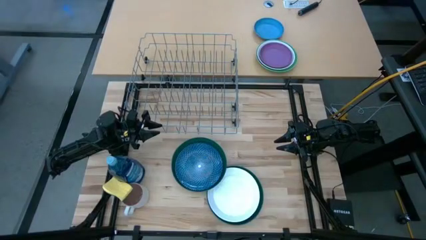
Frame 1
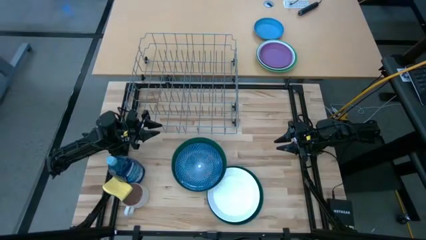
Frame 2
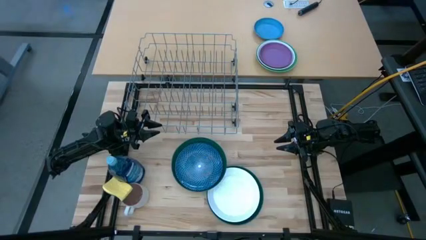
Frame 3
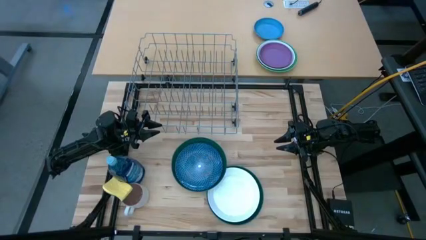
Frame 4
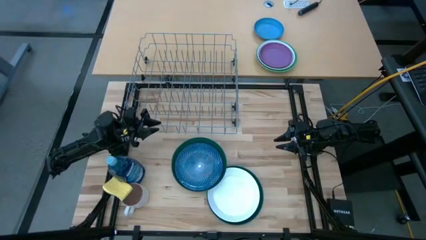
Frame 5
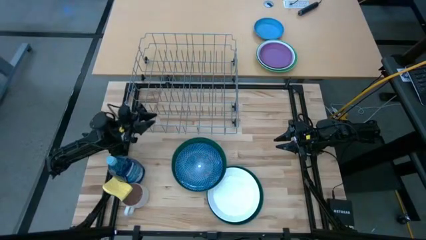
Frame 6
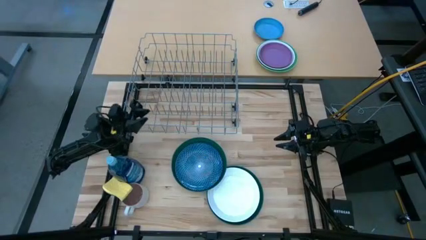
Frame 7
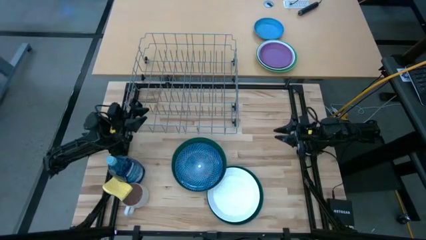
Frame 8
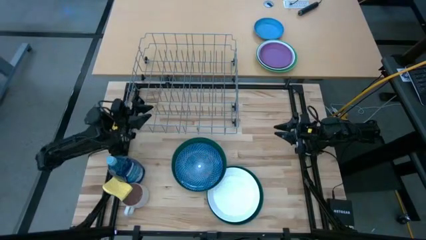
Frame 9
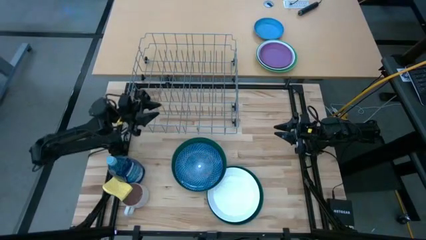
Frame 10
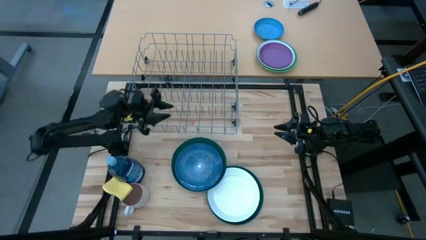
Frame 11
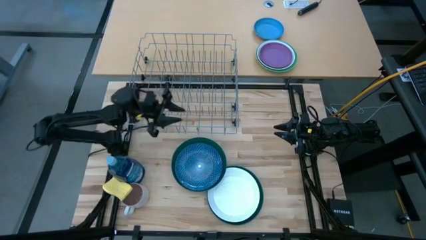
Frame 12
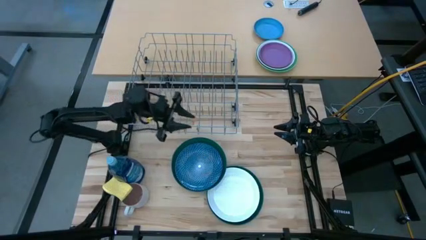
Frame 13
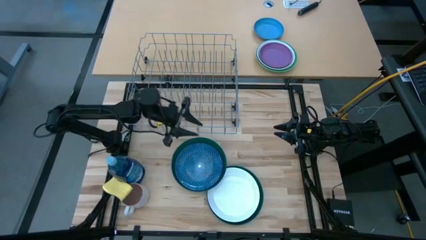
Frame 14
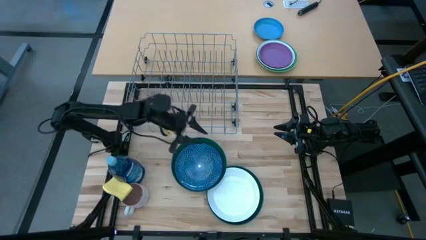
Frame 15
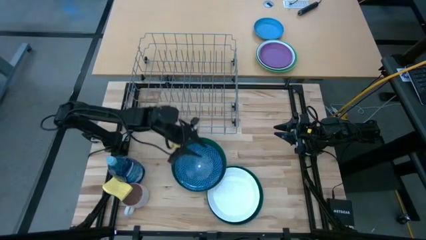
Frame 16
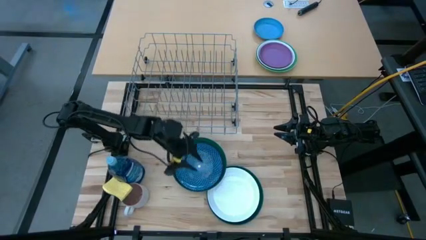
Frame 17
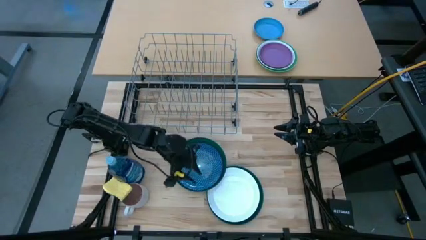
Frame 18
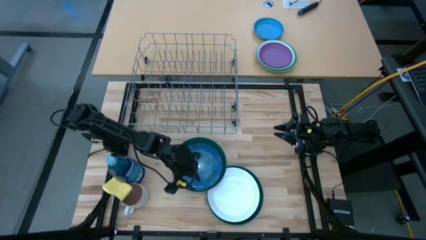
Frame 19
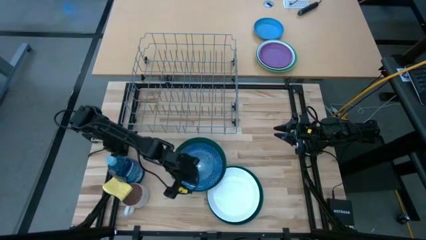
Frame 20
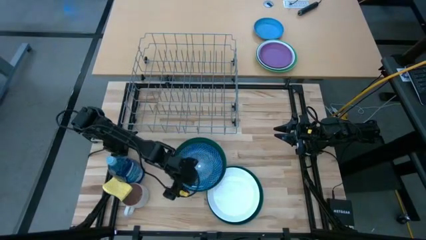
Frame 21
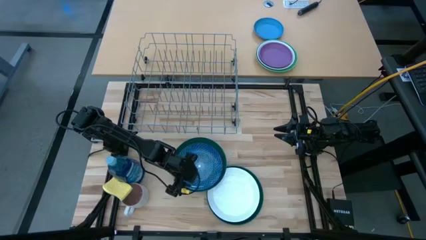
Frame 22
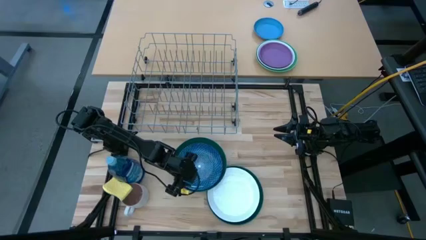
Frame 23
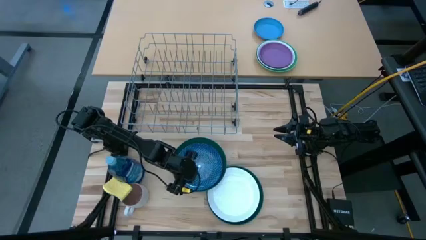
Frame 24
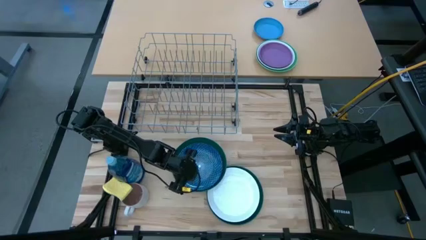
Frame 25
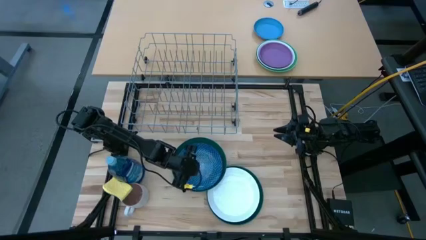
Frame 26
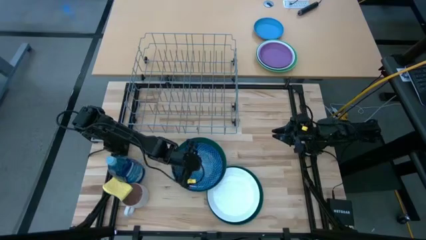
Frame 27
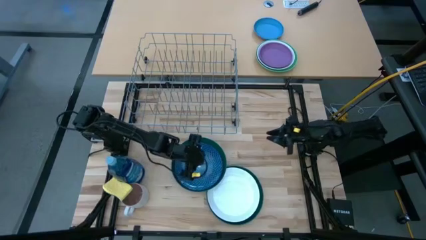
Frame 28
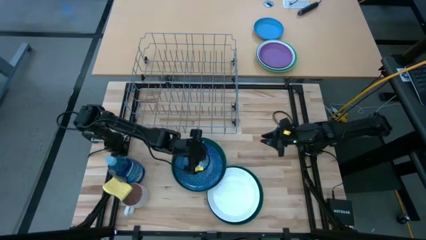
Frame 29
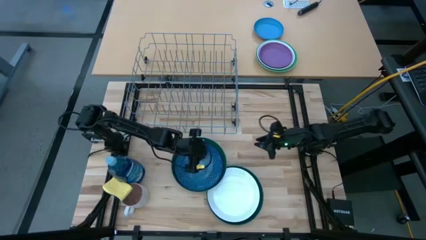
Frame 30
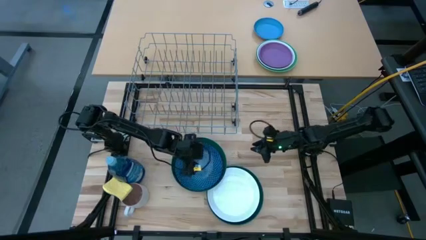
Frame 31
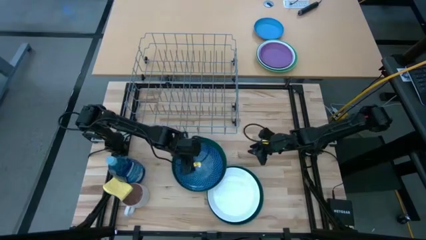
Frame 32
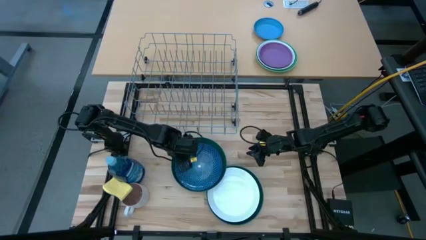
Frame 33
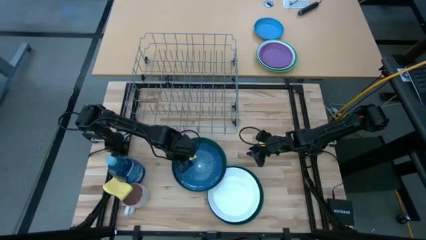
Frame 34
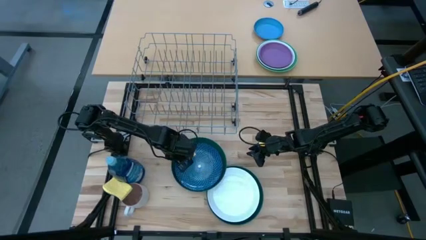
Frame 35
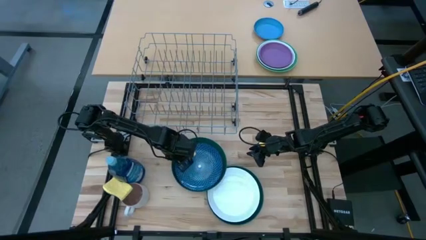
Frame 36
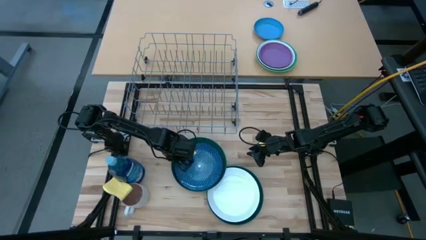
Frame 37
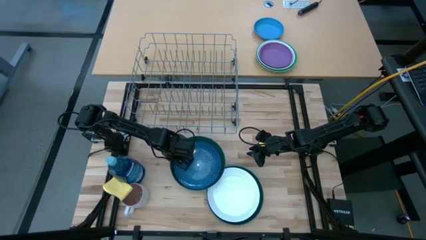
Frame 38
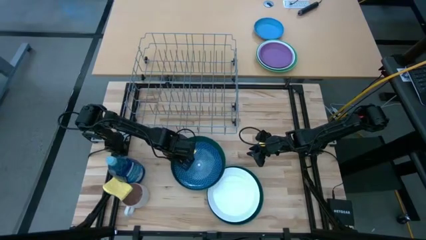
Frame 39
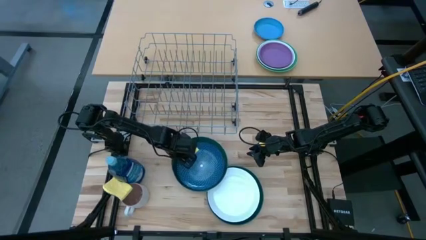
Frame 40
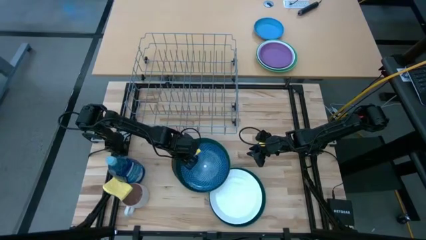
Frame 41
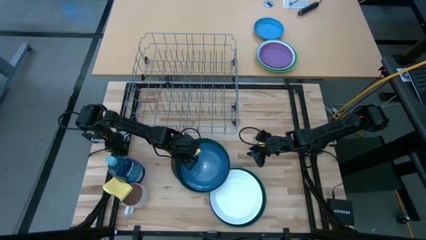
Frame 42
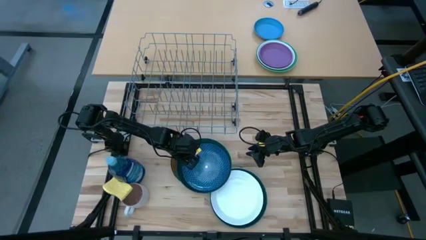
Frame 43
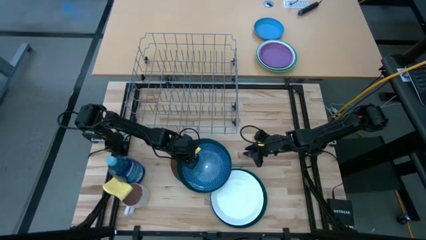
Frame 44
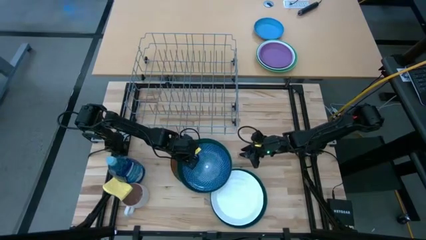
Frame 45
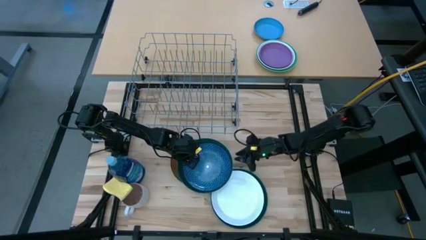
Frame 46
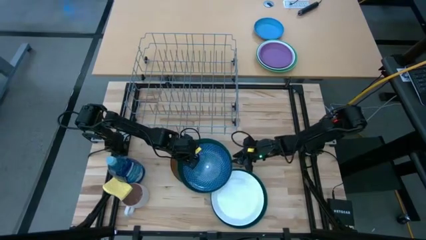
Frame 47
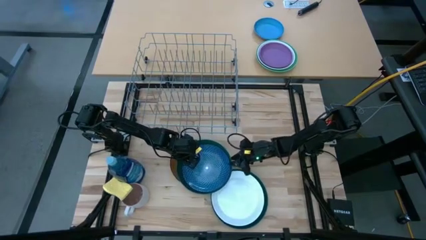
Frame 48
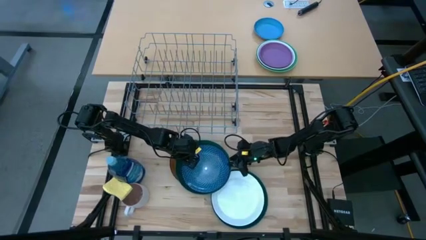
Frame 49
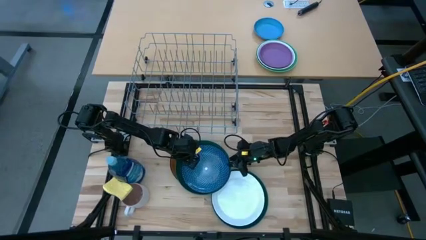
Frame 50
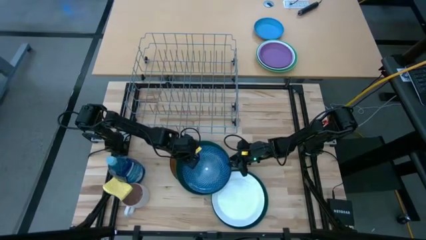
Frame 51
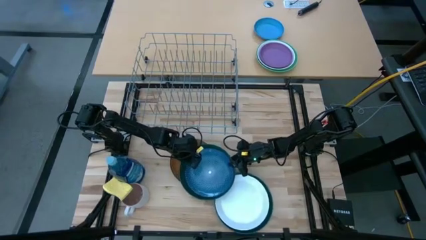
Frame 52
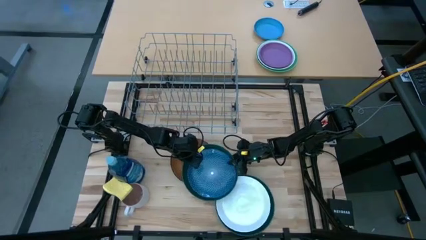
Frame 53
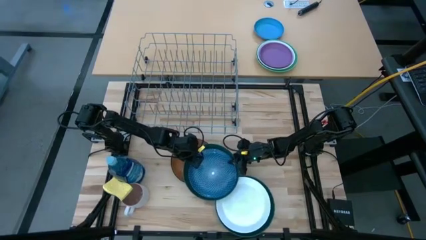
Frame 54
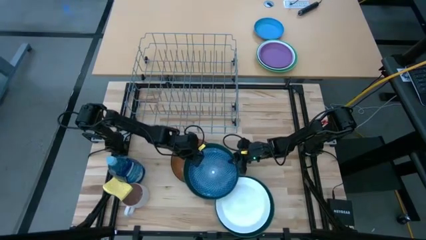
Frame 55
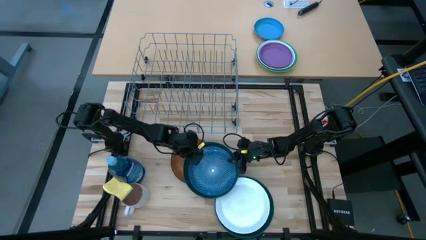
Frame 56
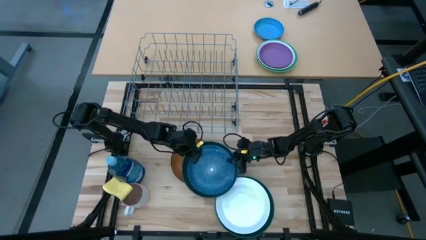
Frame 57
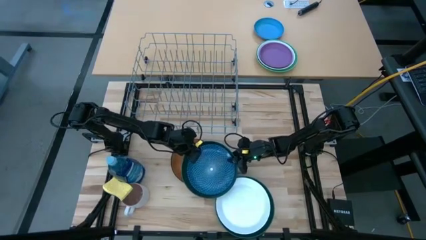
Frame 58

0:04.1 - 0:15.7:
Task: Sort dishes
Put the blue plate on the dish rack
